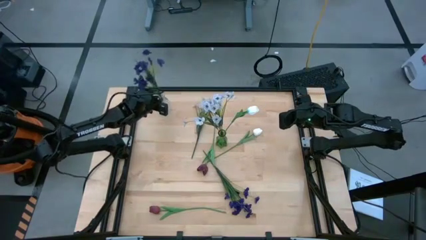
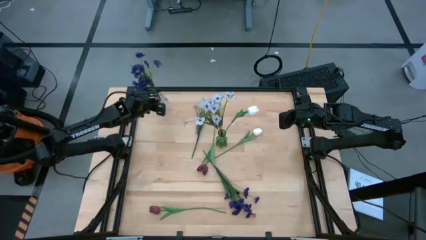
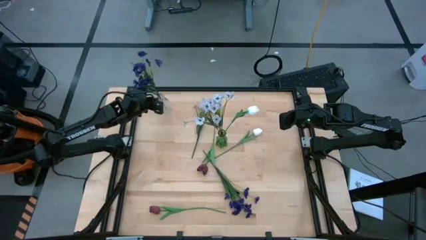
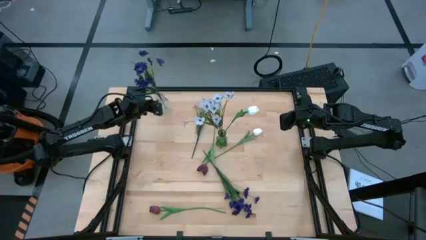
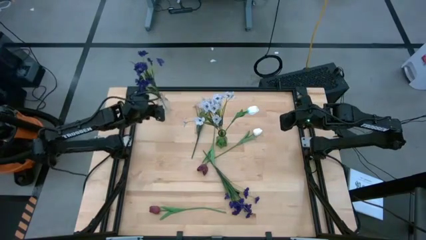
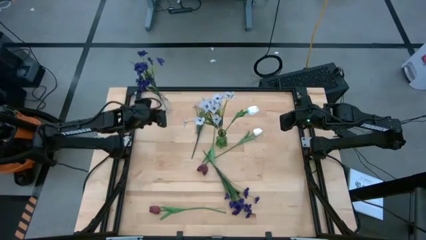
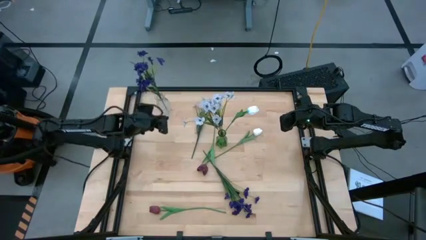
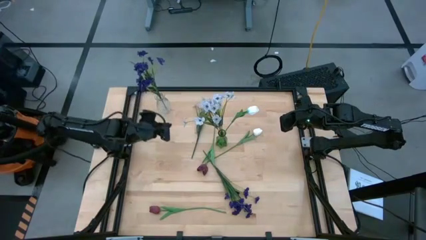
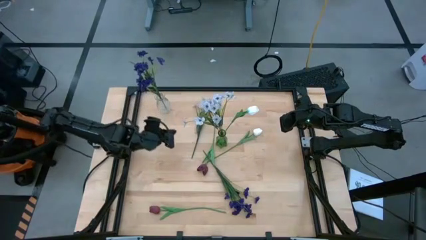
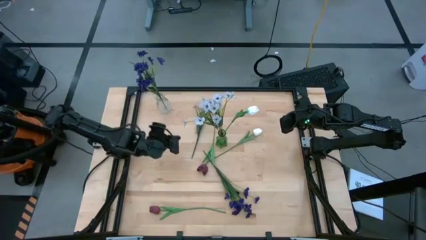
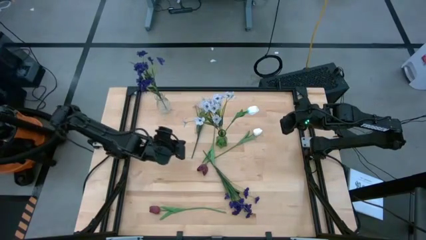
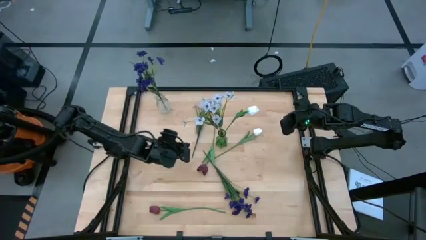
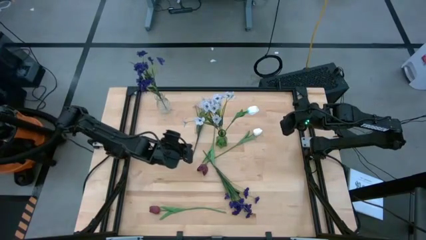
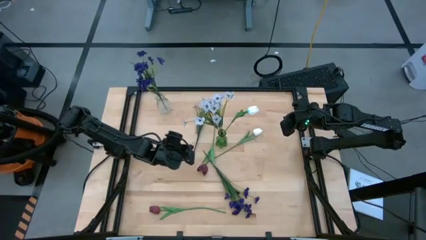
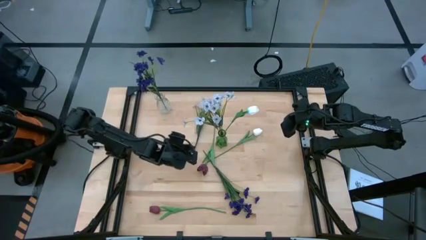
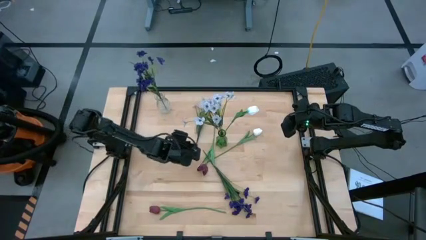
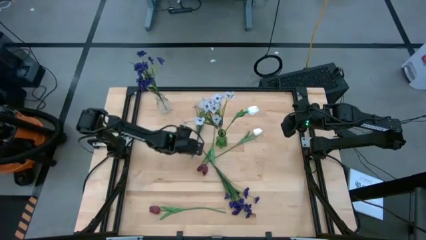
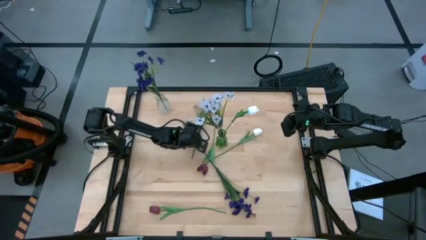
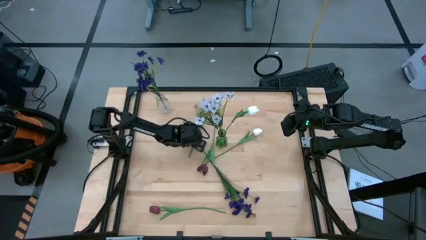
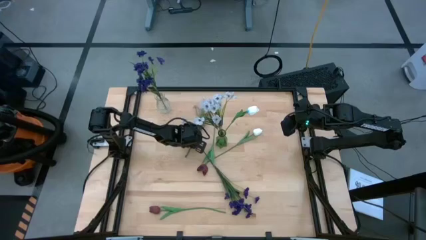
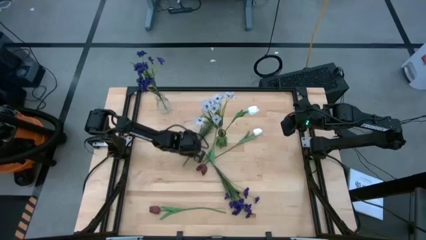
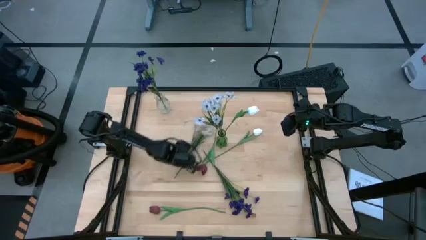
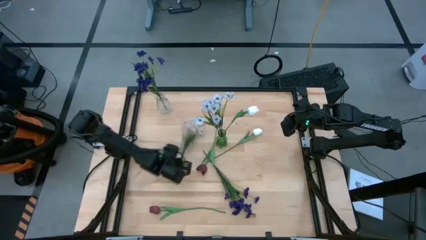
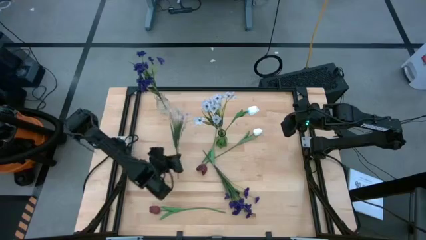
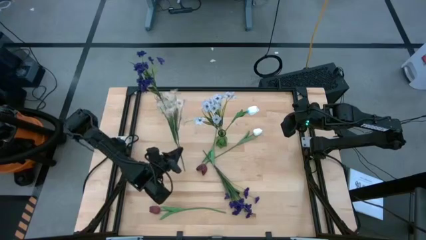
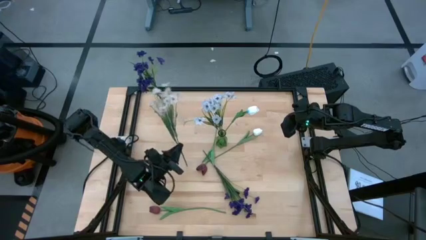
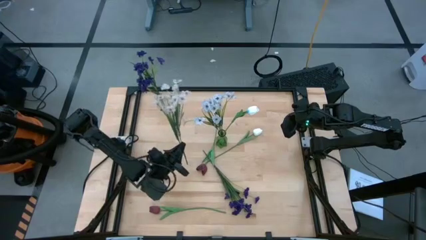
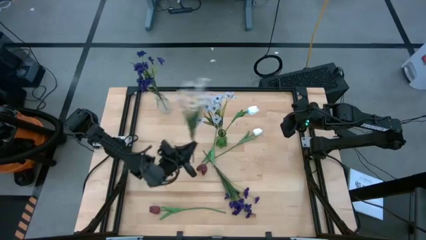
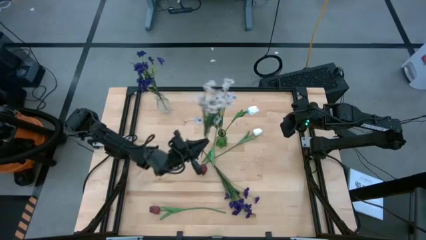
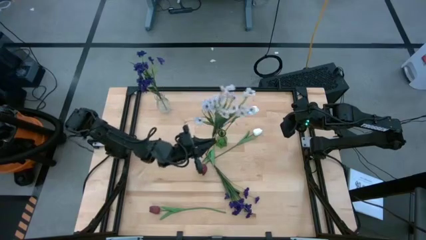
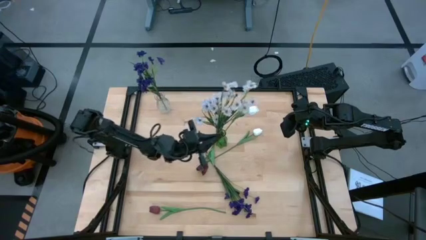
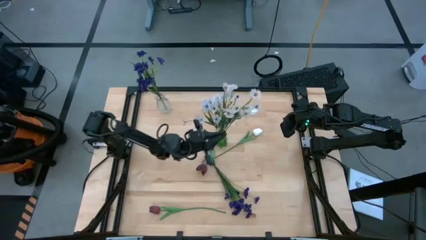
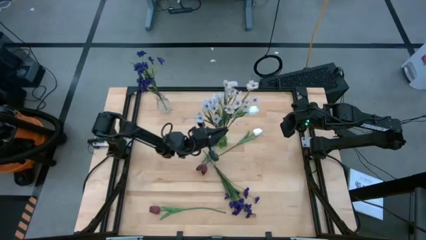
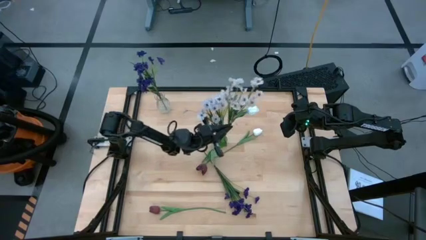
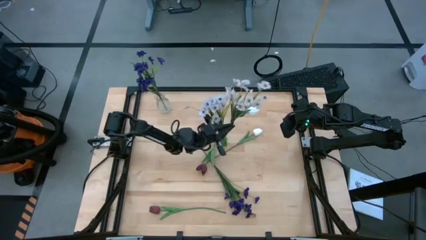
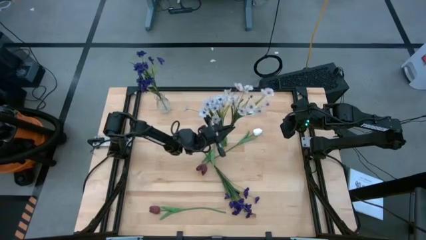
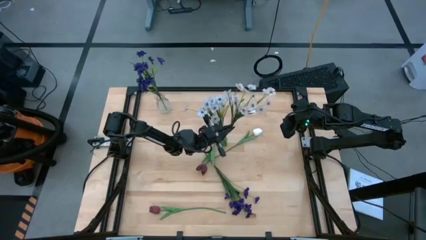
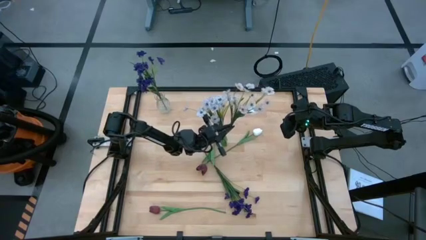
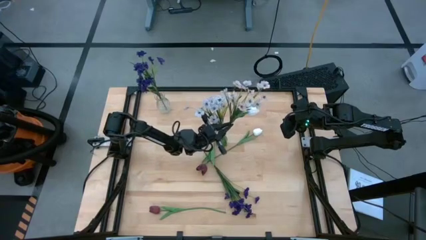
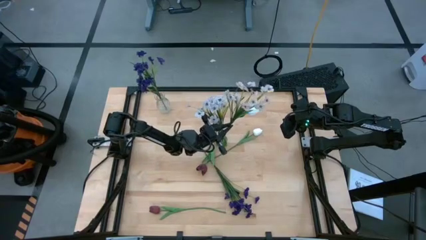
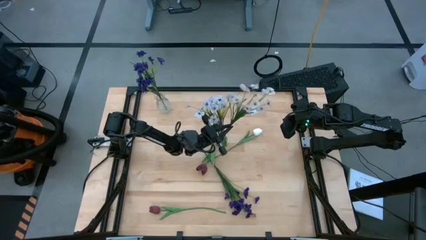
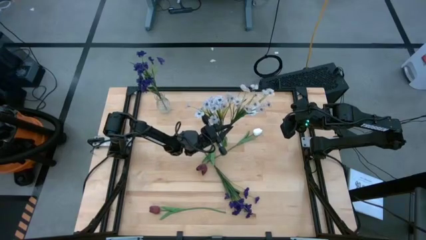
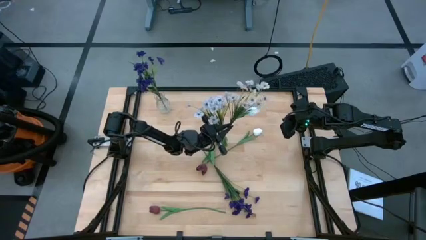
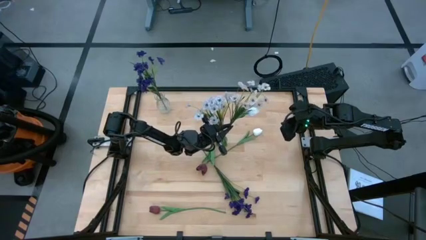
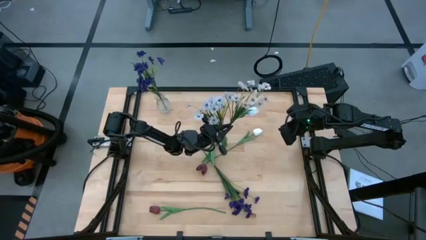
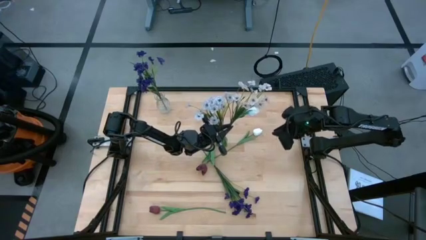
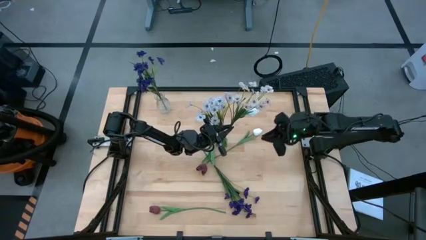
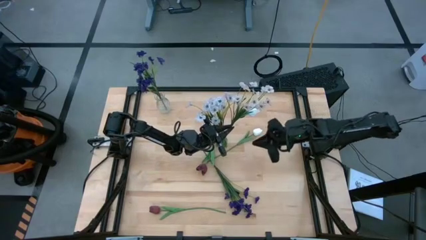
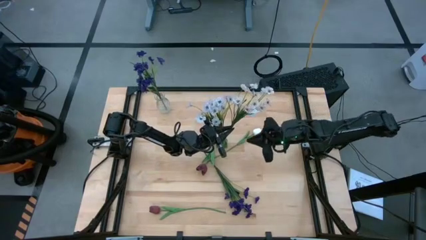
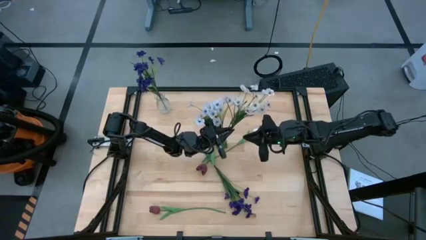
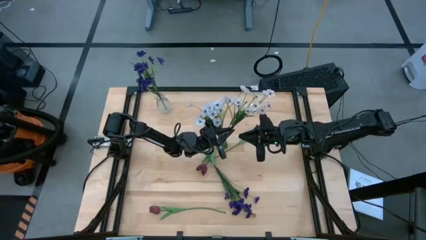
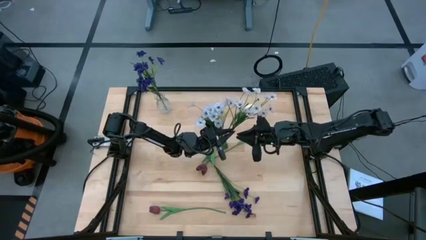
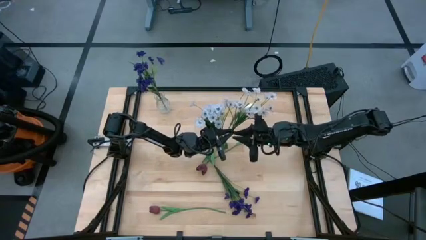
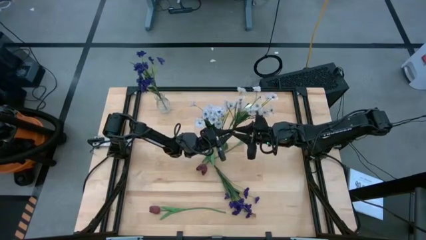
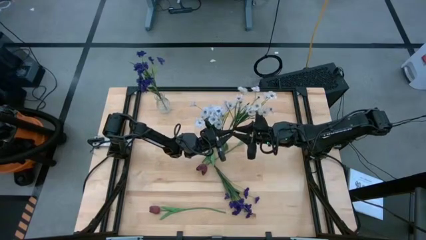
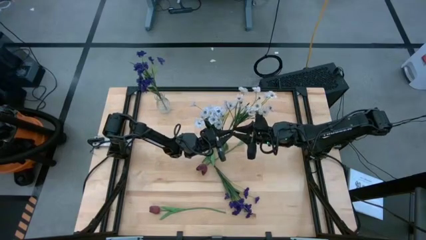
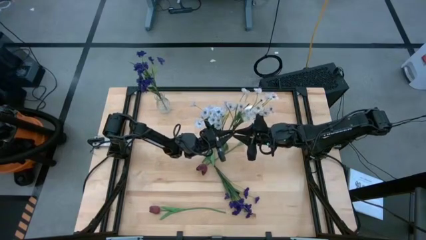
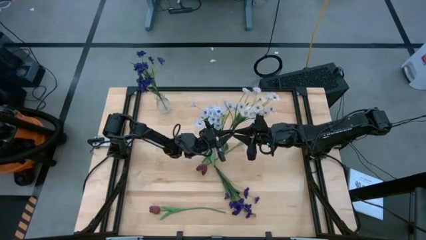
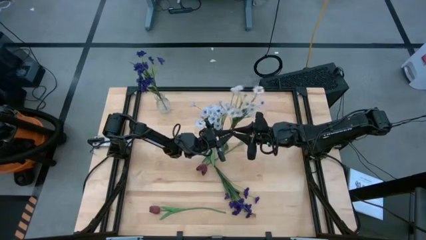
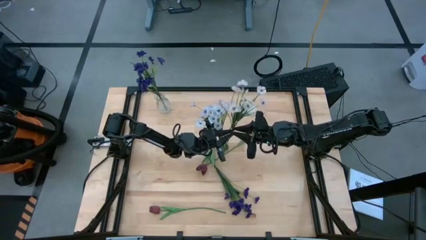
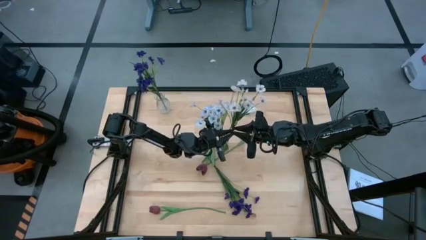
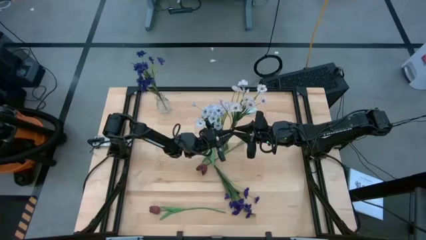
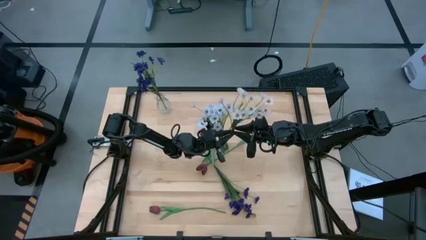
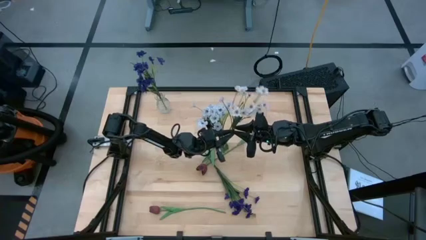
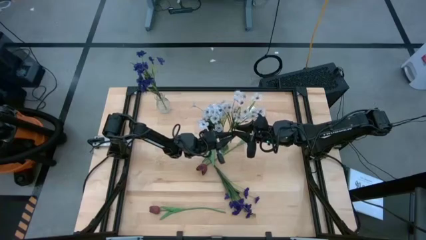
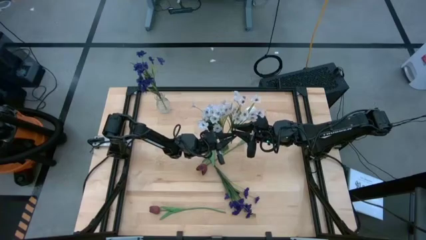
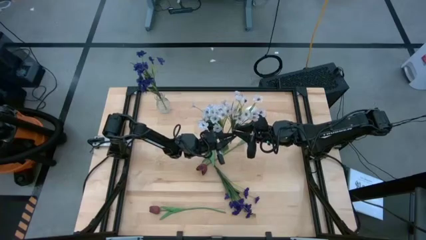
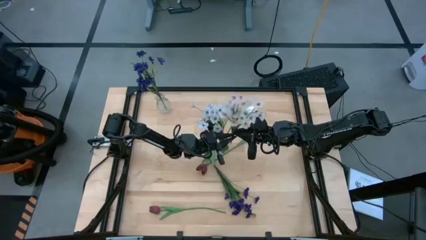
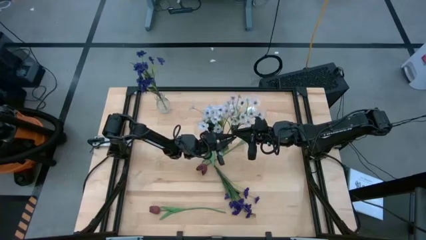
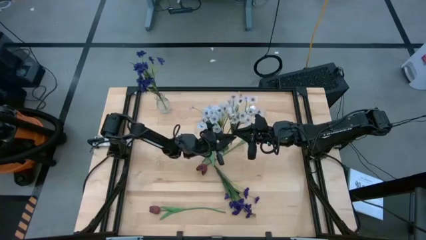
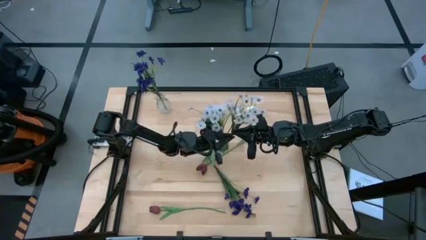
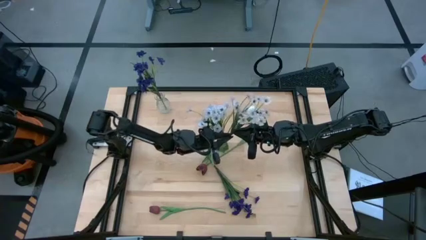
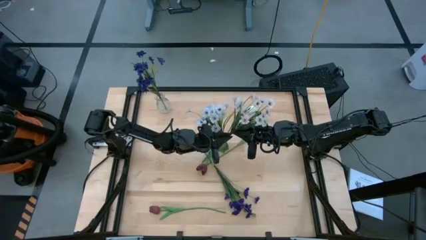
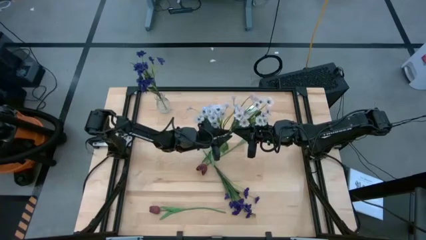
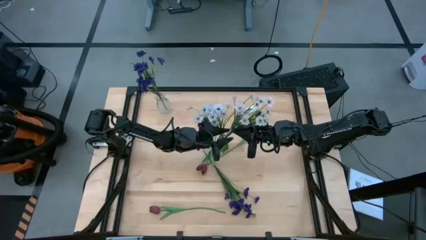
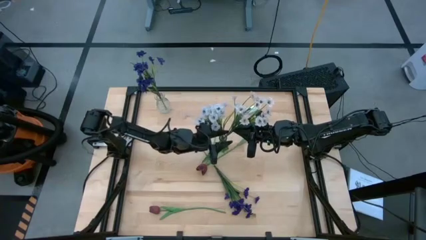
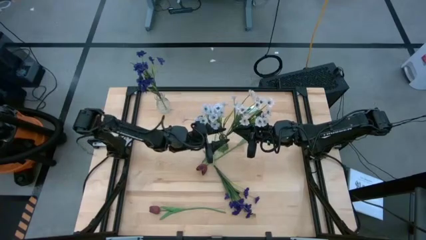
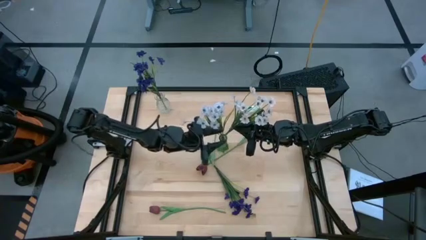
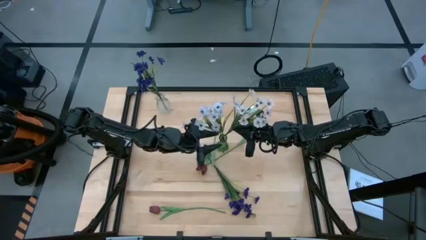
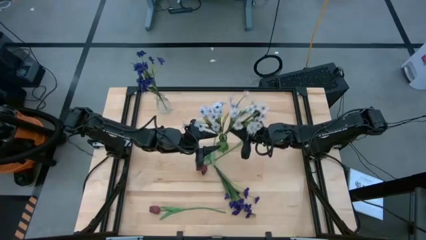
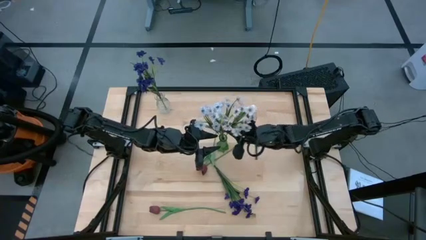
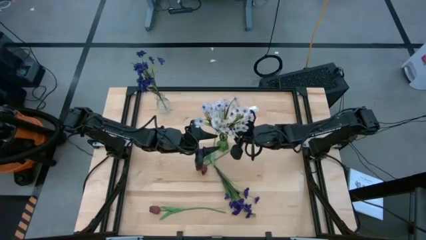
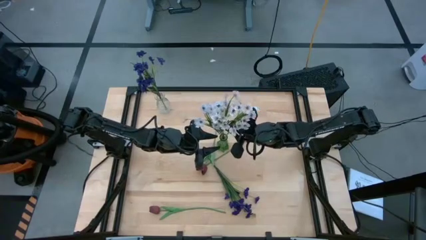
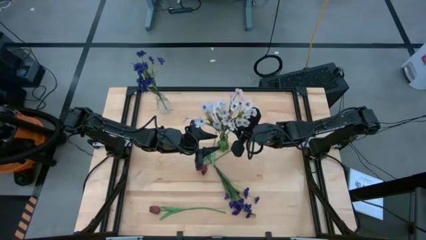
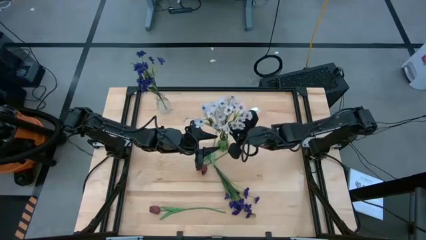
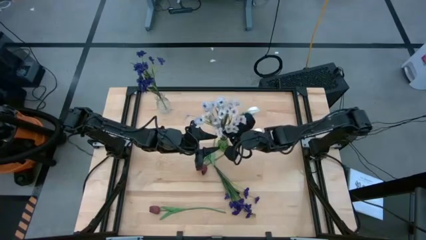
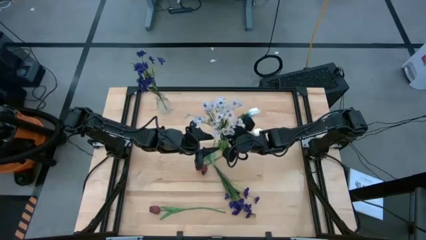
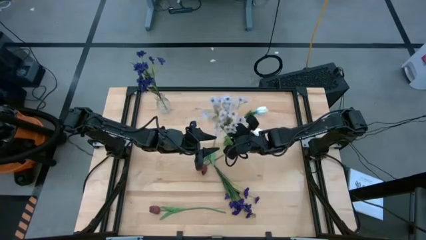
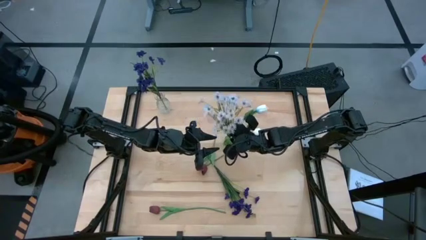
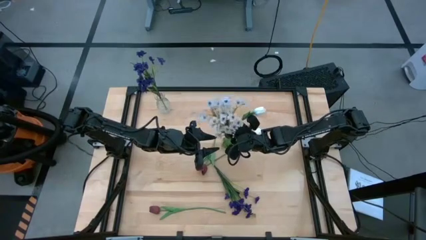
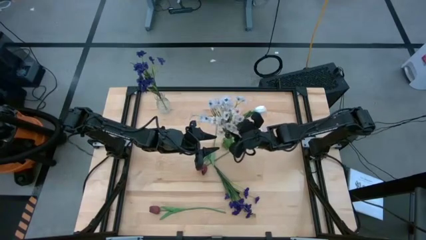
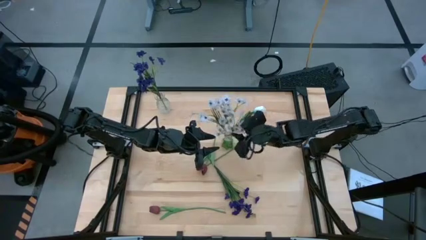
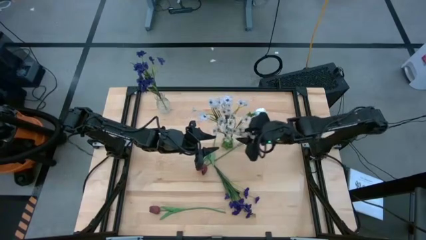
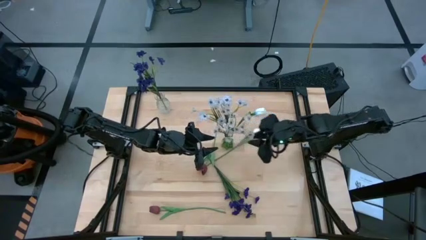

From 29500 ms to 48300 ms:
Task: Sort flowers into vase by color
Put the white flowers into the green vase
